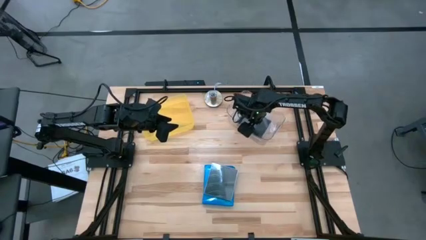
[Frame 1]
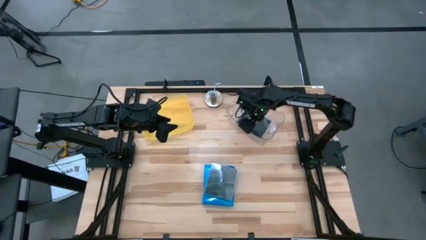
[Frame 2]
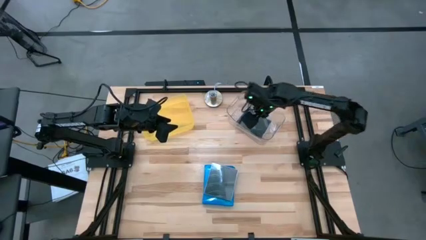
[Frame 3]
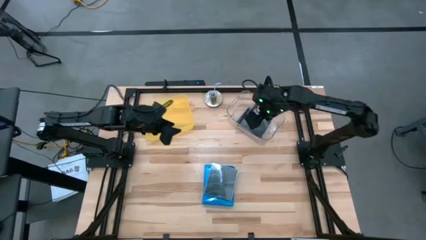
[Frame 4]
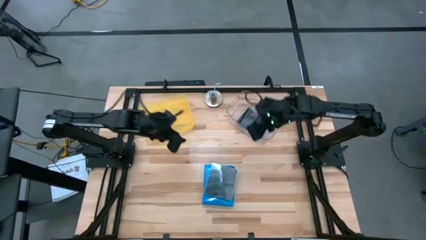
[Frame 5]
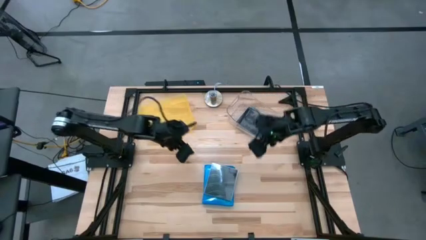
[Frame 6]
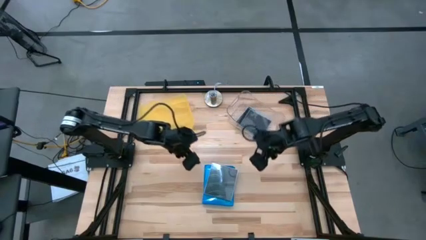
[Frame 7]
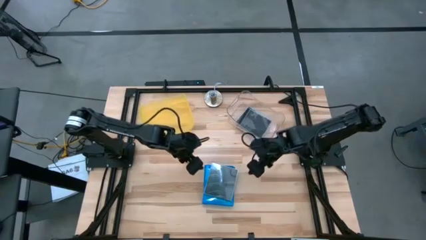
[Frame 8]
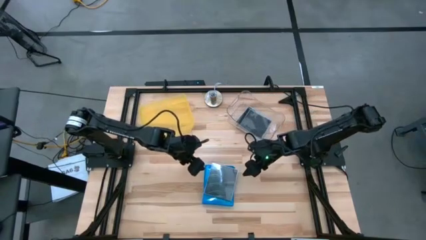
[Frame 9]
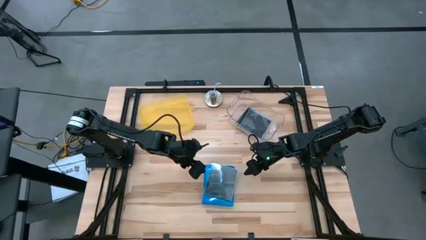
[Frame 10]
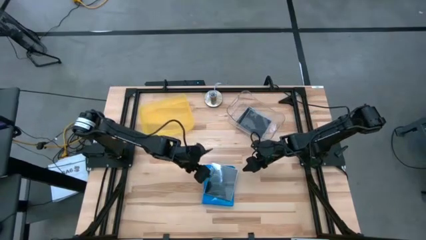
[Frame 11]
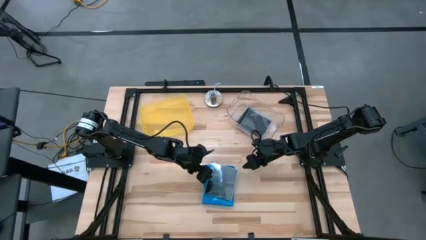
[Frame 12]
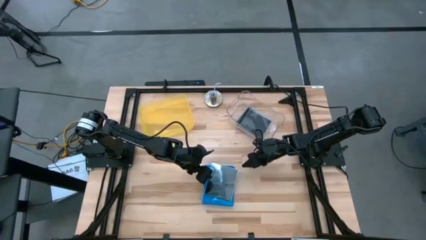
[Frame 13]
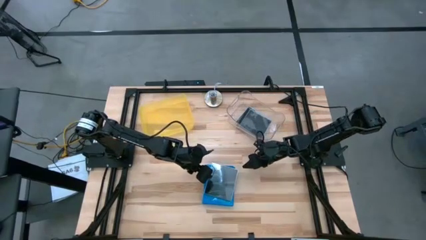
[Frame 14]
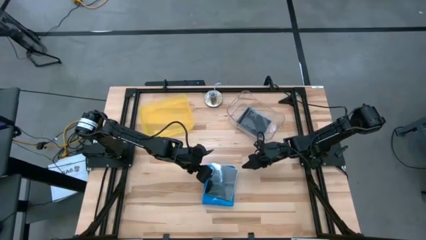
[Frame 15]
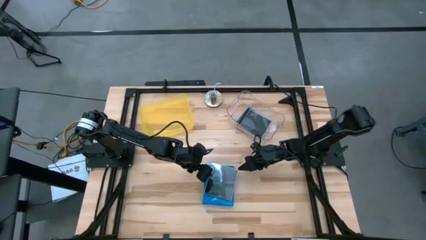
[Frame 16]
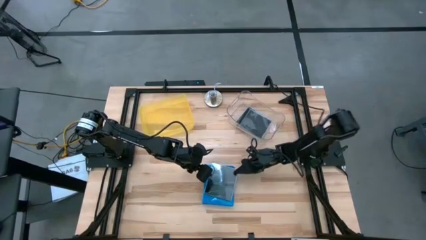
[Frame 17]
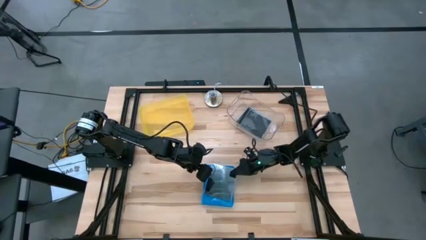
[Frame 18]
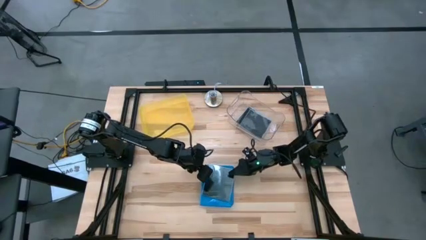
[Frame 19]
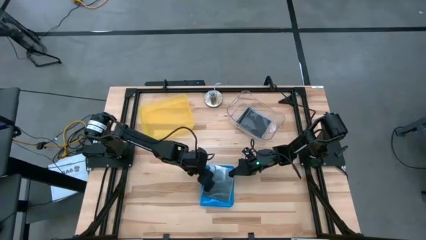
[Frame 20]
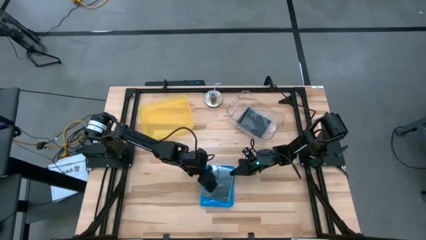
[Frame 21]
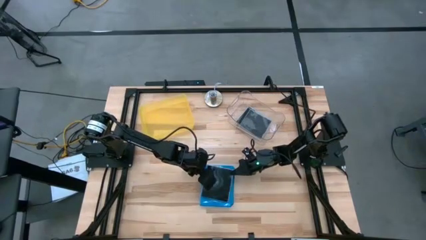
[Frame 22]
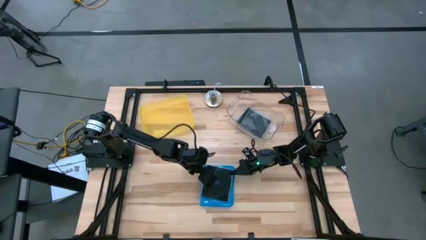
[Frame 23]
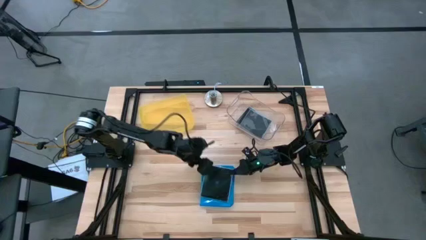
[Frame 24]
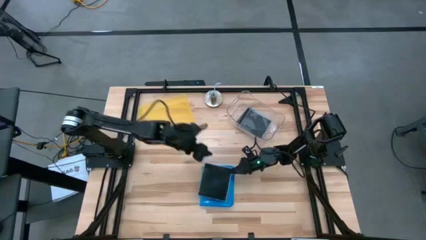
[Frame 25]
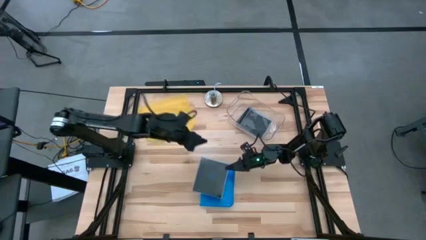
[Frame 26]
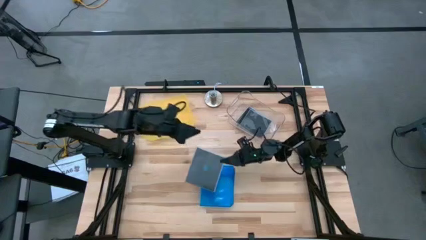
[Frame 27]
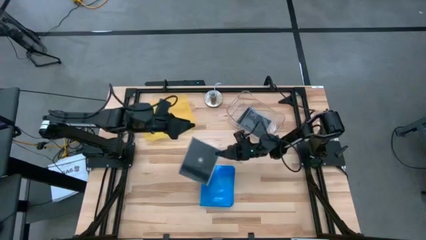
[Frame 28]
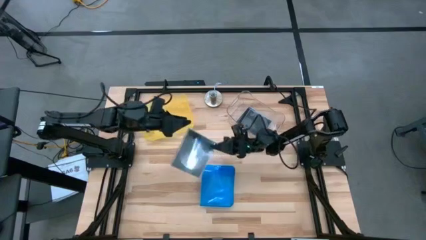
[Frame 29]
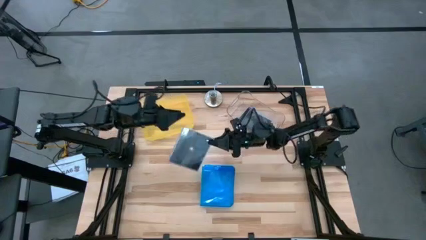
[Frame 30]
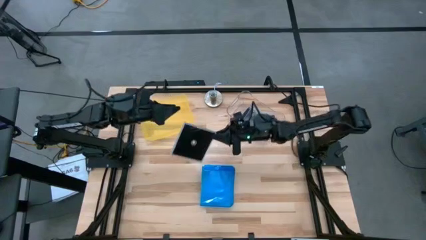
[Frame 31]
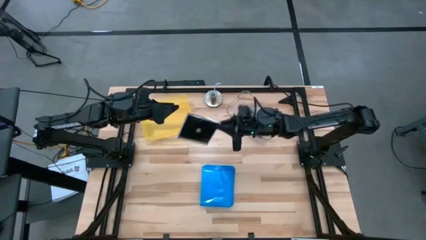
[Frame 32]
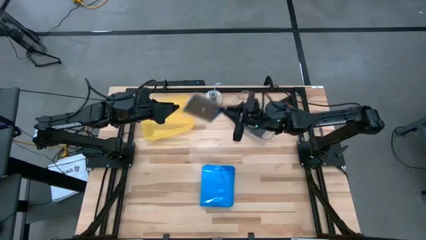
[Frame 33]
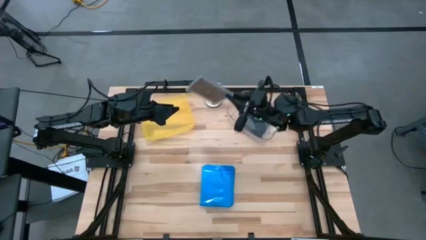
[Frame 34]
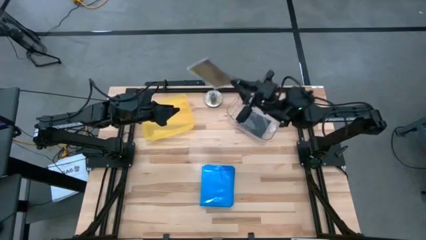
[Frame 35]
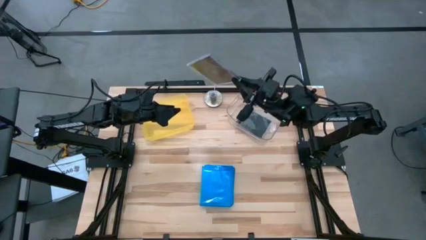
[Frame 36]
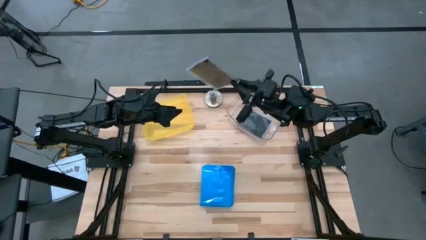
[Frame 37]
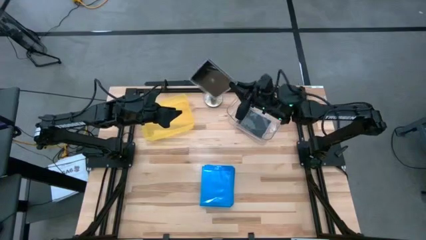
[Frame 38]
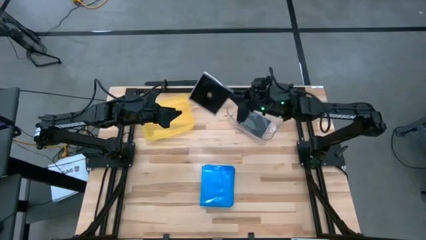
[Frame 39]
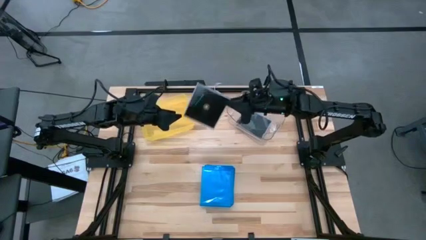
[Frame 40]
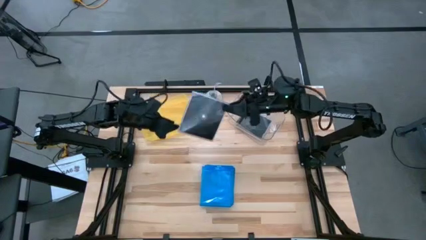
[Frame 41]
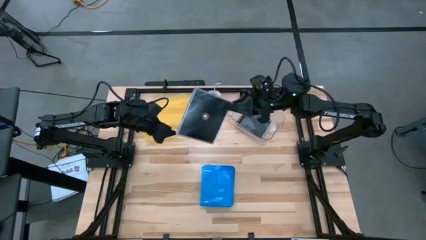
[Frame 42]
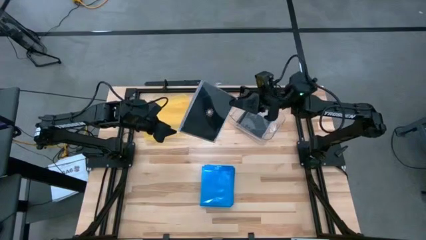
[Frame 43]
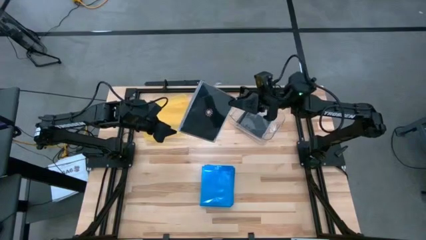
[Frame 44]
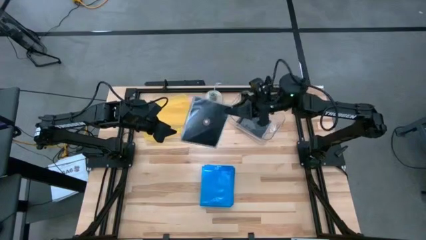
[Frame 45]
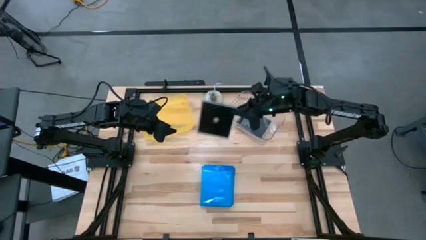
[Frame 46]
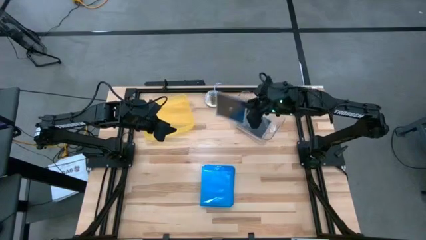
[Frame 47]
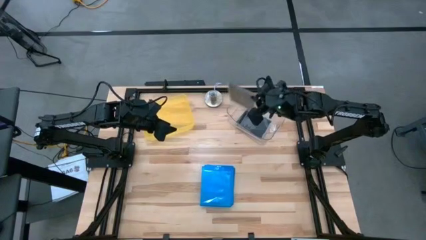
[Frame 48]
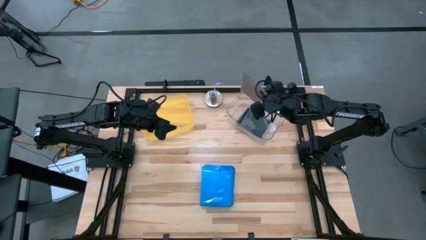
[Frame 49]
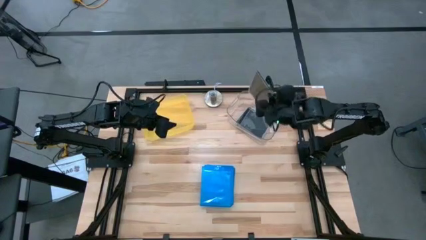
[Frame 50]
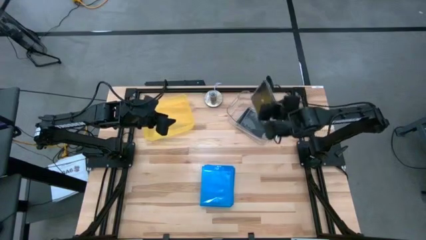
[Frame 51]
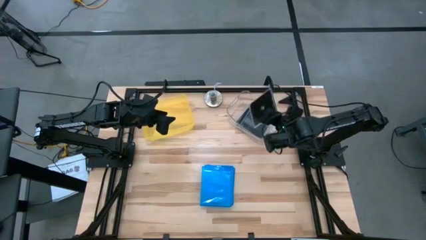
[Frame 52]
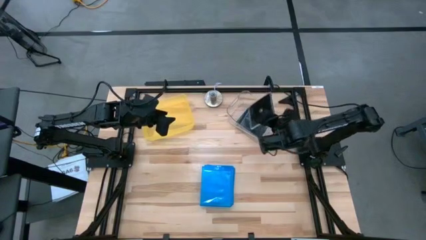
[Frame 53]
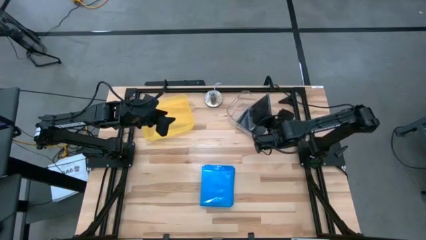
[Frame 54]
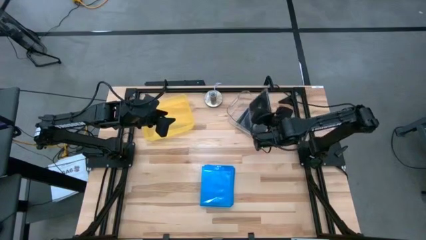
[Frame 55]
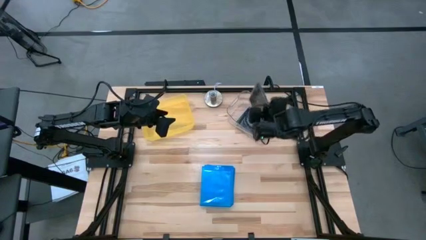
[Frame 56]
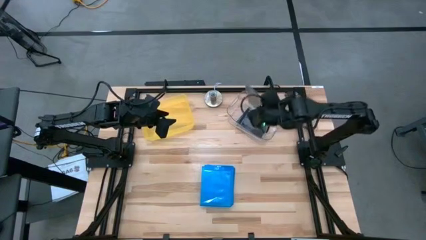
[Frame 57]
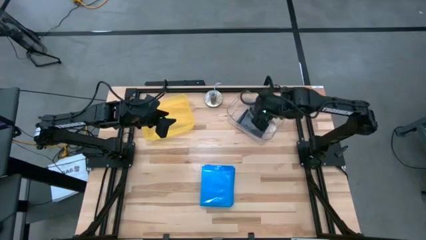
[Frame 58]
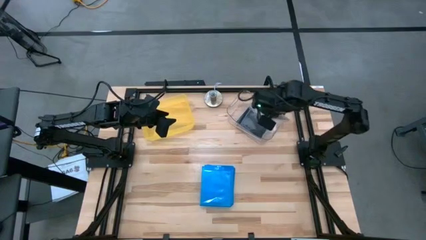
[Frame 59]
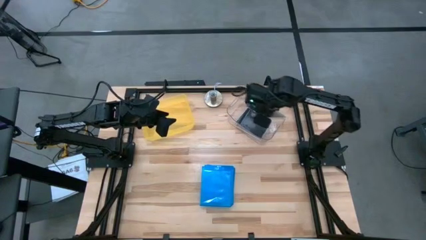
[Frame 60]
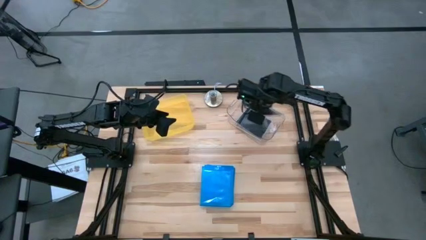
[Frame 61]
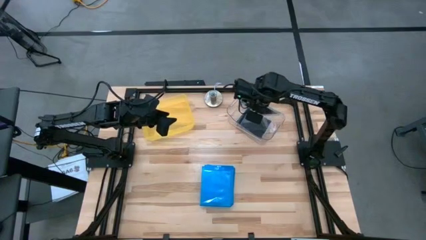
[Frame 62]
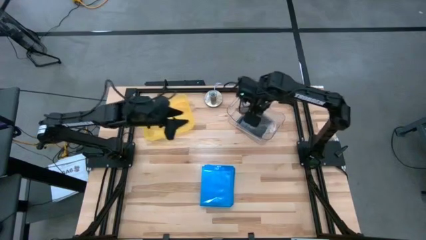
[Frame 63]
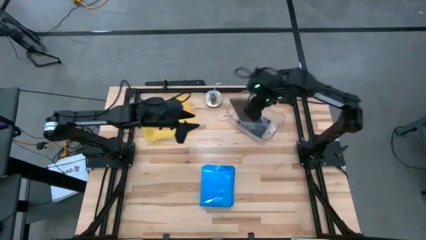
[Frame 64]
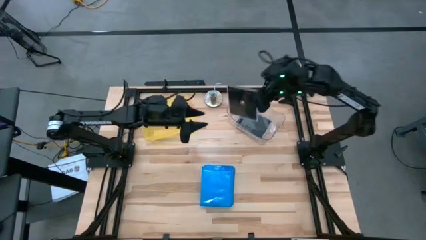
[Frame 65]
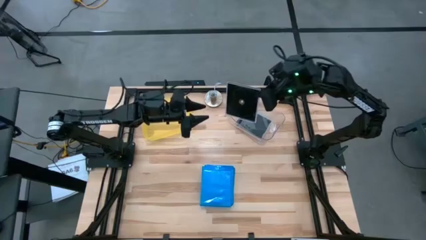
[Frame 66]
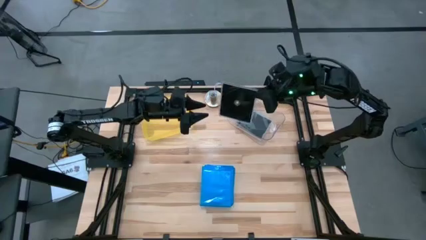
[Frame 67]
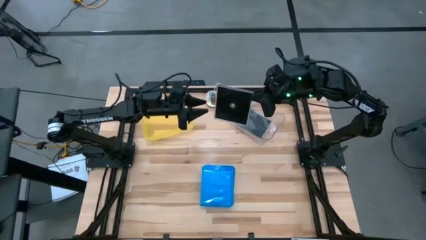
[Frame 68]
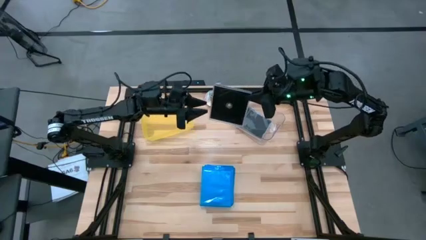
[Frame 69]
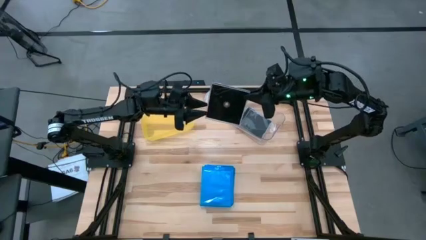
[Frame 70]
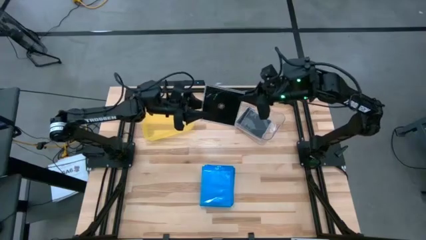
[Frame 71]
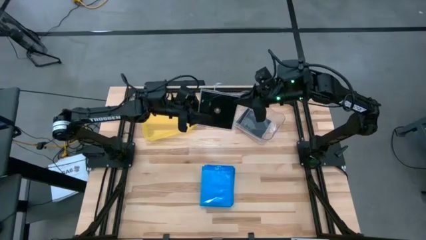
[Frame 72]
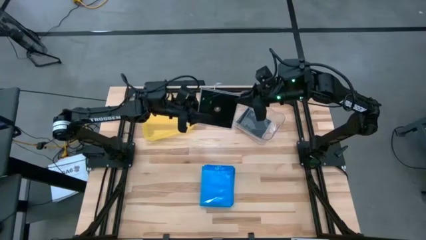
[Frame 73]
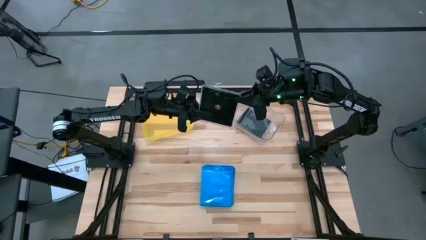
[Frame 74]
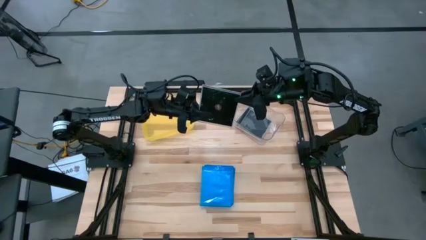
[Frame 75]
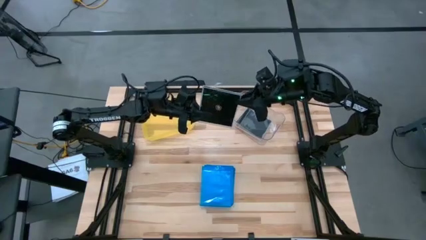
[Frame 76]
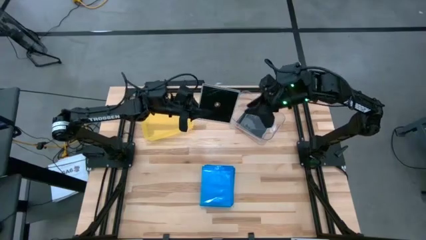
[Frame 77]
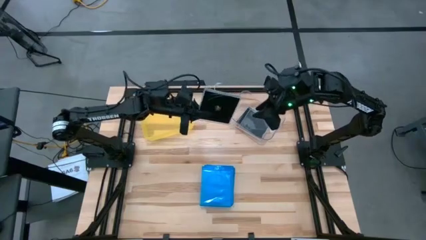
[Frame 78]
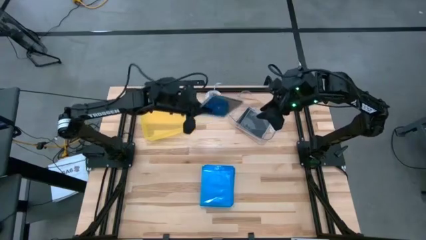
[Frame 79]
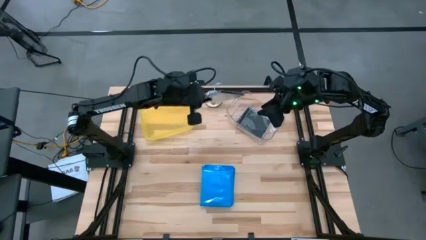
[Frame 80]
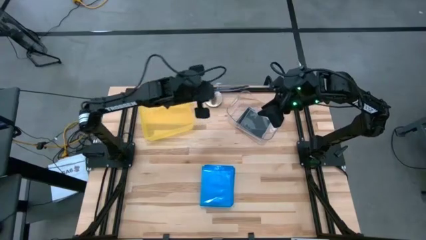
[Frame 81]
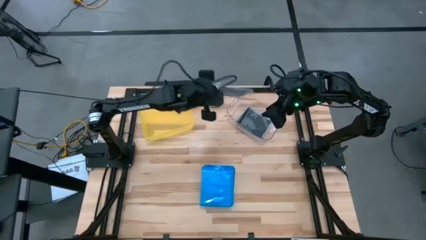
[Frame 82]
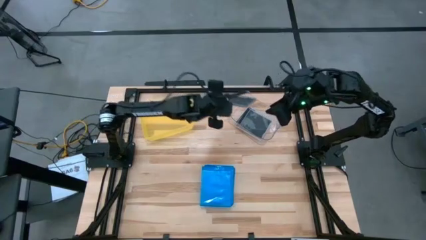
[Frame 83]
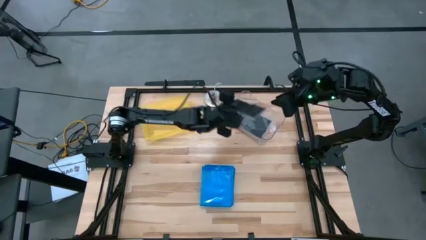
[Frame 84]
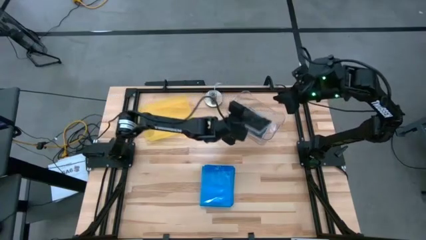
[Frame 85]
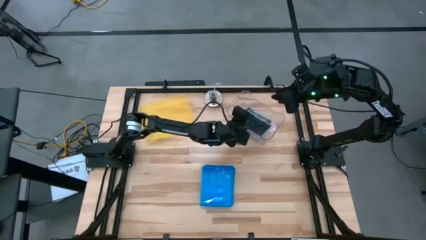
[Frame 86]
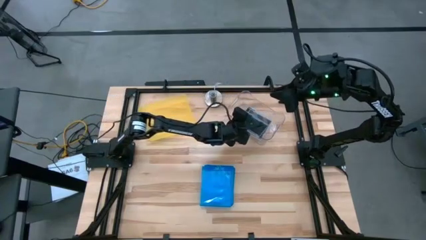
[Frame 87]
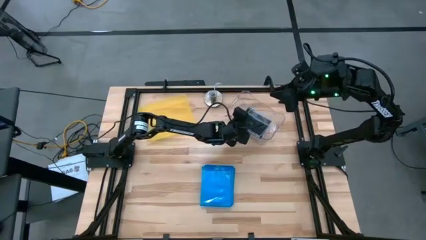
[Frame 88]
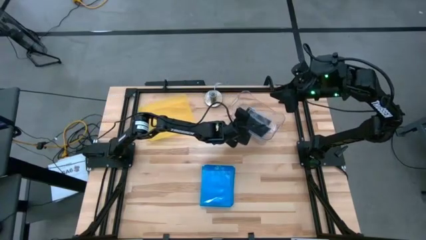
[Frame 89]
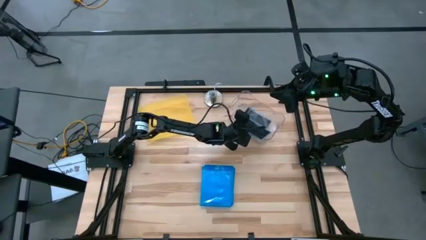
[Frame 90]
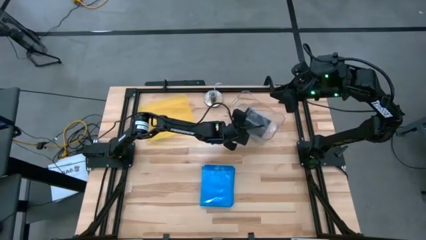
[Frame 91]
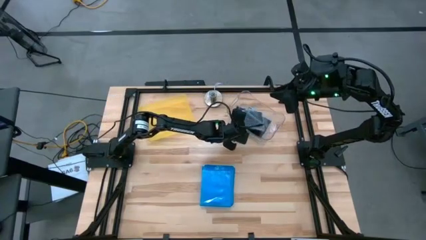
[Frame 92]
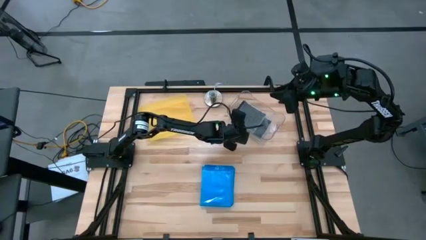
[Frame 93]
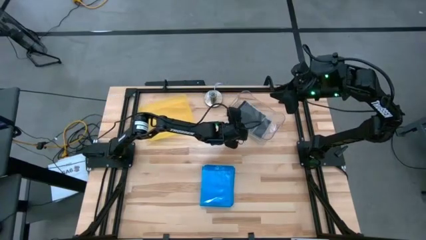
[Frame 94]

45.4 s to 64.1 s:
Task: Pick & place jewel cases by type
Put the black CD case into the transparent bin
